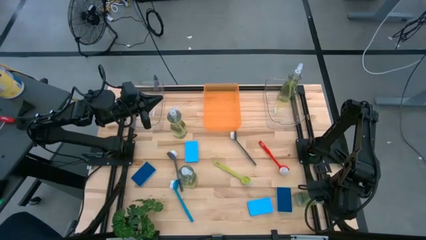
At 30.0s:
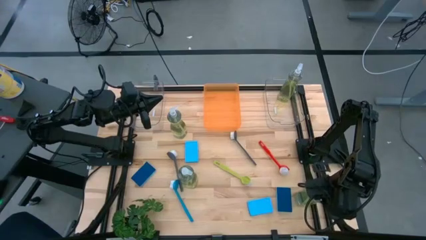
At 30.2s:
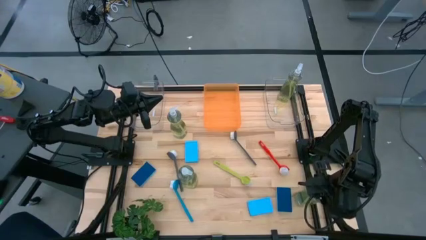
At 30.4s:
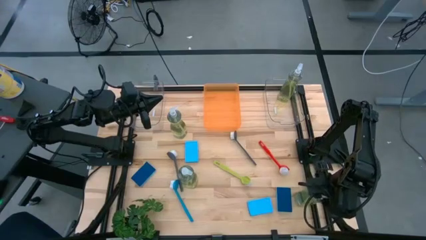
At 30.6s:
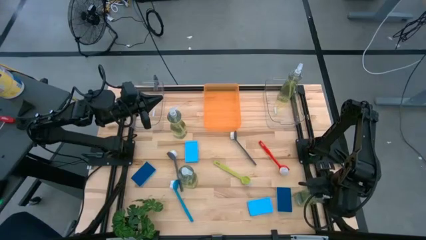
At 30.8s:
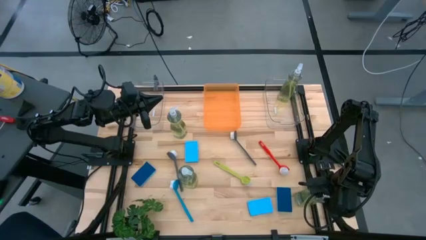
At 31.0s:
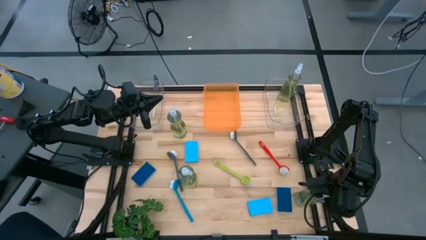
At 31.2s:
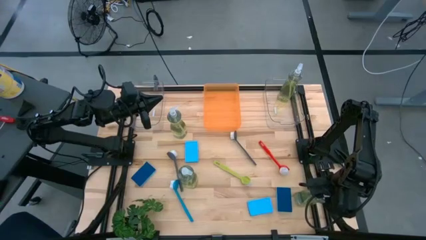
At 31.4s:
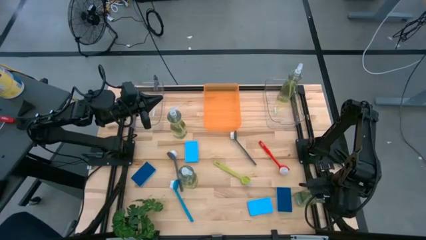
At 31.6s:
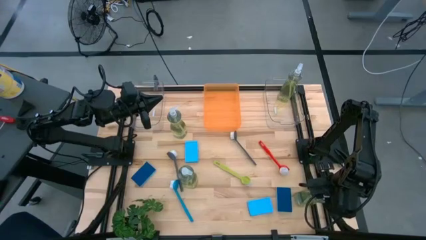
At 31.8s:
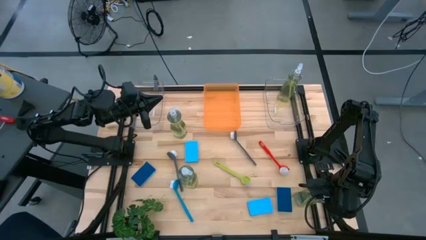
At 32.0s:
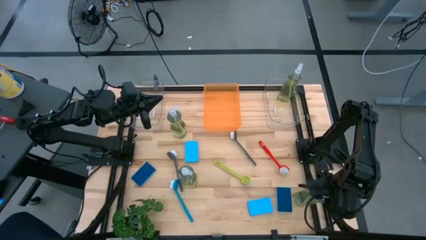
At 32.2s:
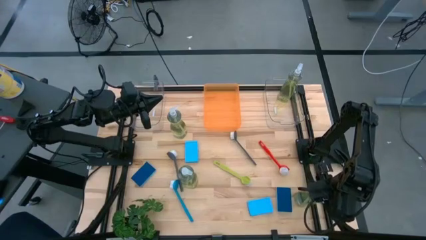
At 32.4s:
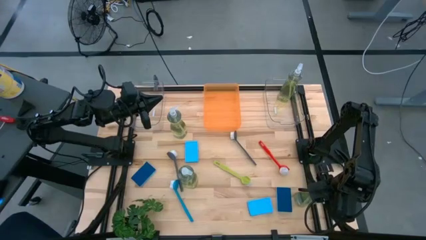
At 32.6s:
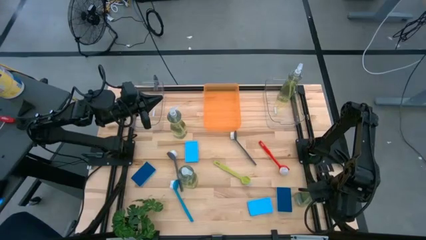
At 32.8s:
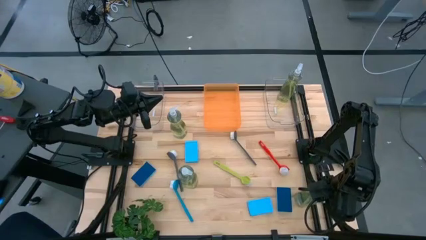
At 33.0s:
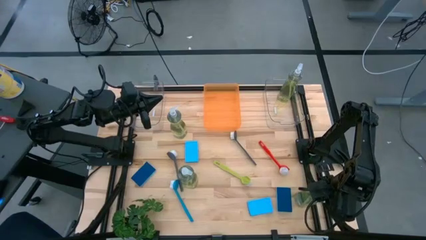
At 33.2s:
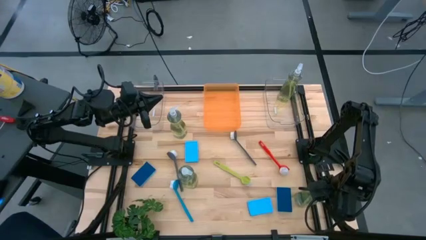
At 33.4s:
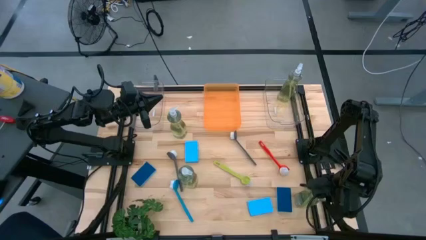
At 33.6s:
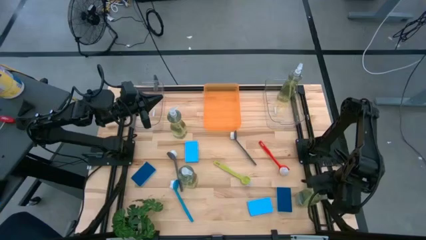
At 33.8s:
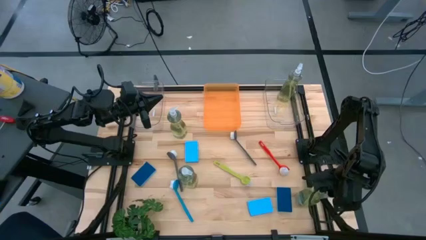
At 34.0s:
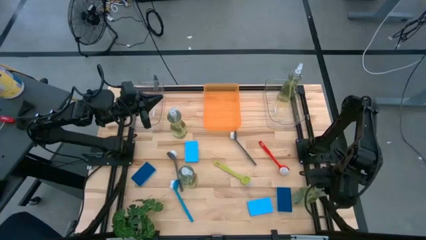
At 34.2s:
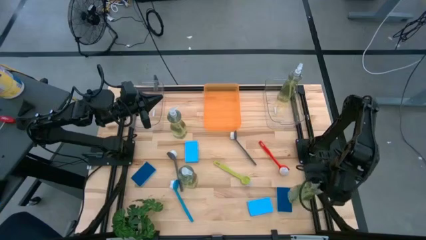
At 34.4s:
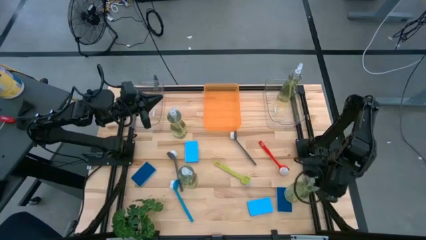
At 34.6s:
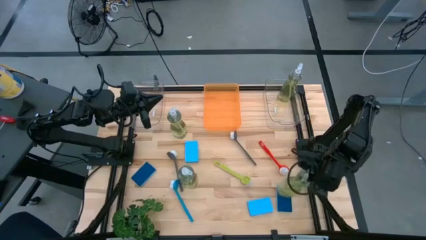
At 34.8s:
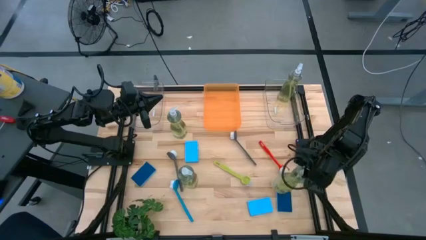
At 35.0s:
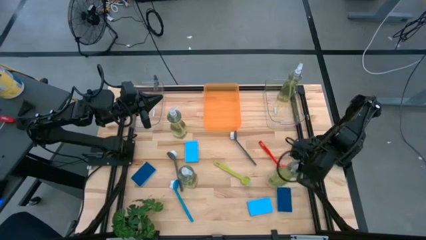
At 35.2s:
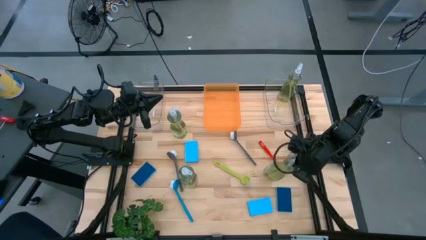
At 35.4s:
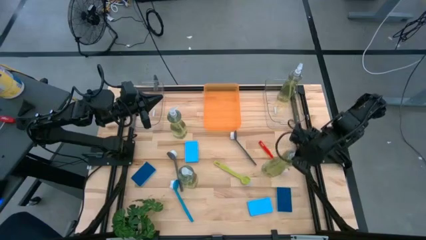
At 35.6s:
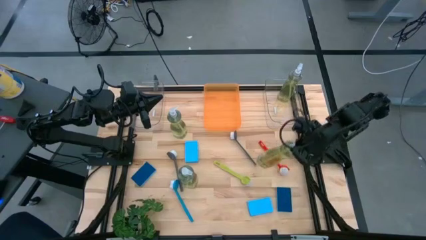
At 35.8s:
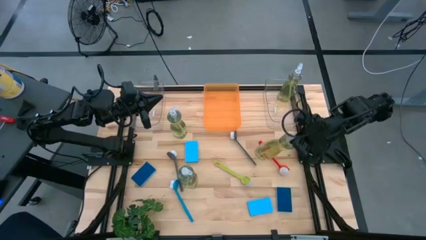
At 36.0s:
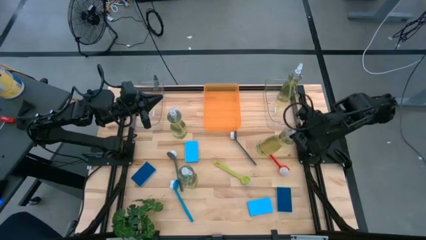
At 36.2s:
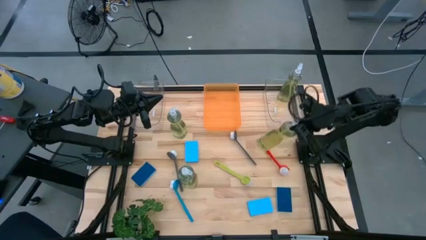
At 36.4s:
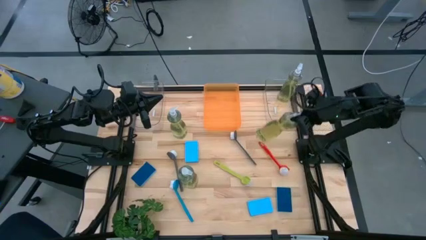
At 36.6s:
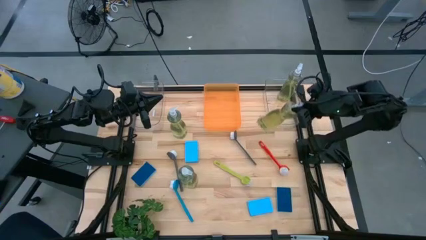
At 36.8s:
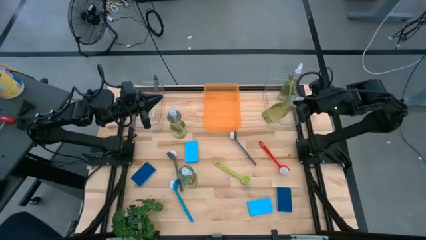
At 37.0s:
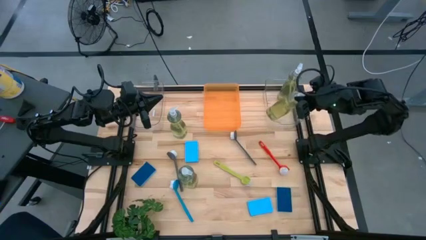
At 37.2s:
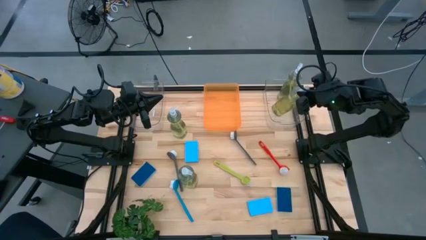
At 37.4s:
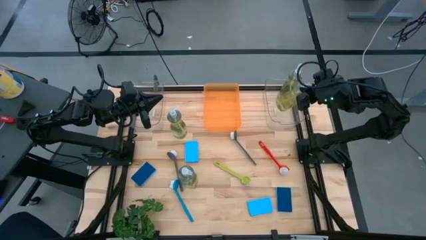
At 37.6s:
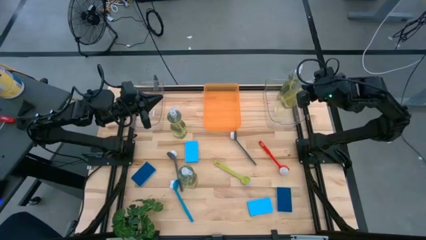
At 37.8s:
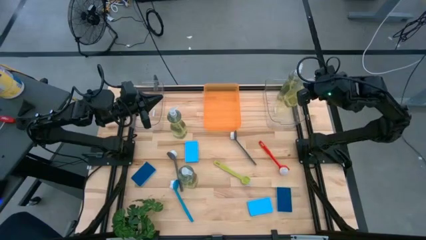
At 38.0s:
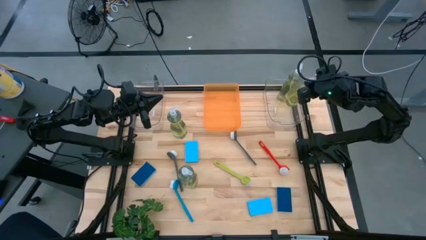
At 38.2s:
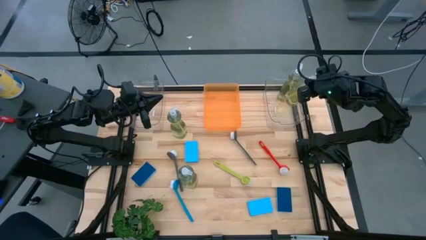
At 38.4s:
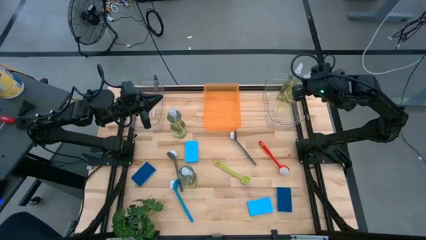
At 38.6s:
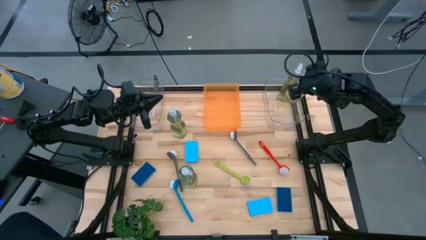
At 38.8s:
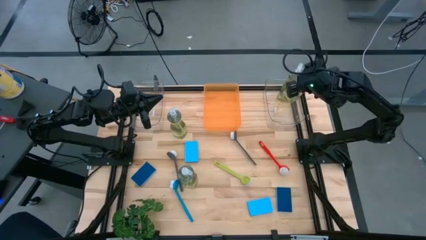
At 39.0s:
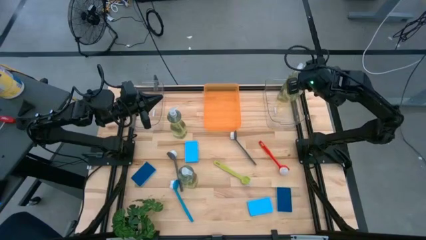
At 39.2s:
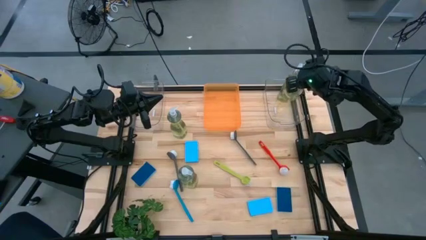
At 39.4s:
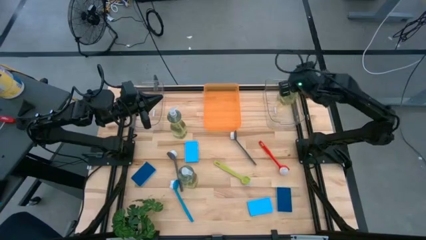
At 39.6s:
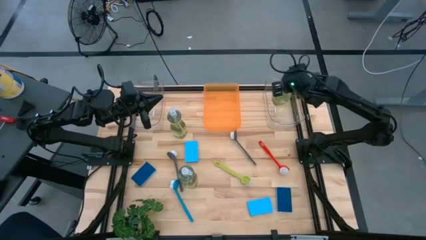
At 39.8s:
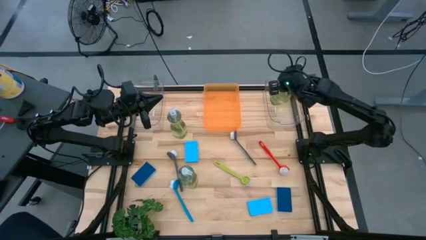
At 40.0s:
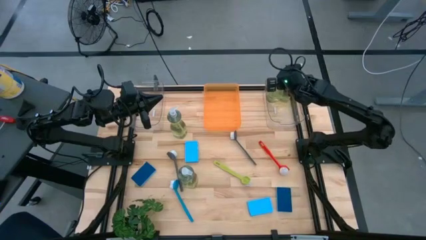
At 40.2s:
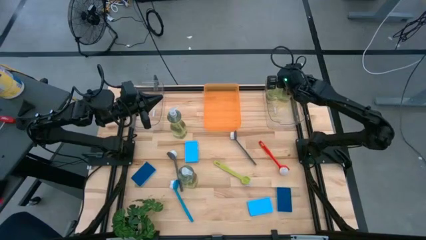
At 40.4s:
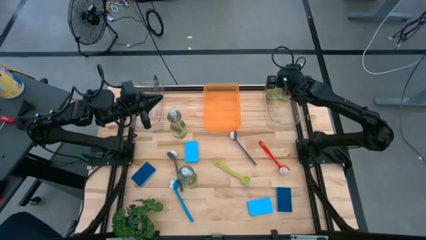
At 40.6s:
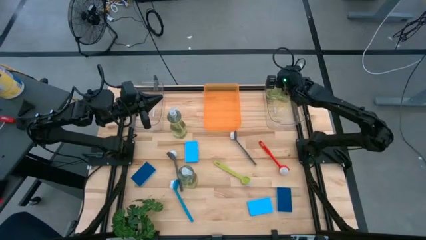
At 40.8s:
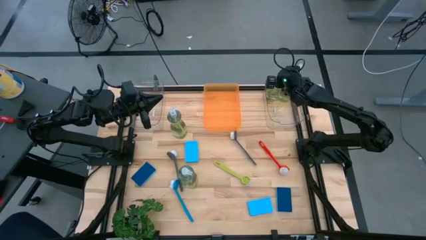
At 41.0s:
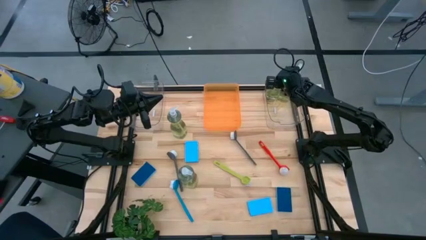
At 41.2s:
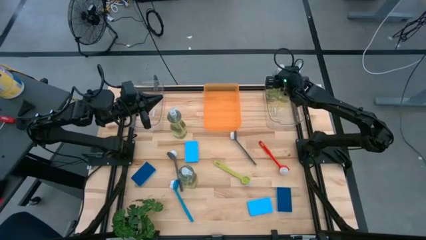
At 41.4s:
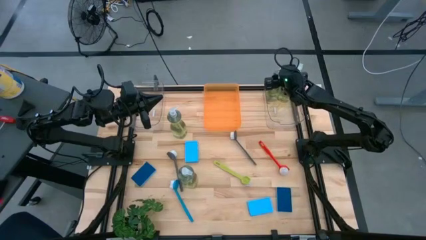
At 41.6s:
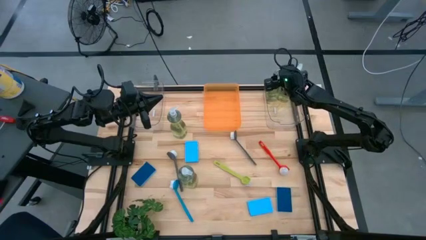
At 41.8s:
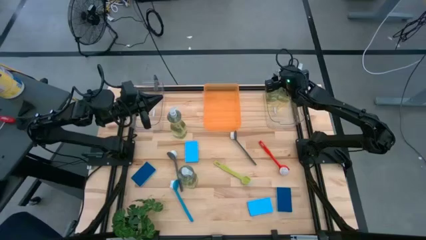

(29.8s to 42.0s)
Task: Pick & Place Kitchen Sink Supplies
Put the yellow dish soap into the right transparent bin

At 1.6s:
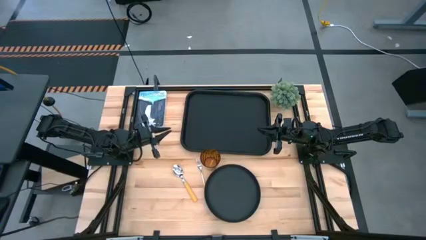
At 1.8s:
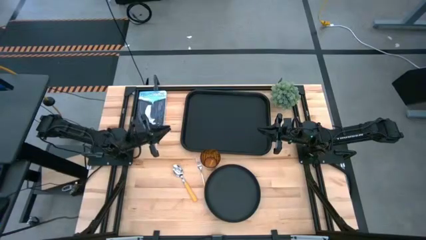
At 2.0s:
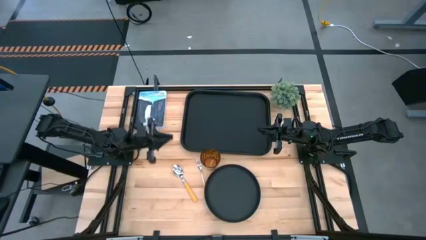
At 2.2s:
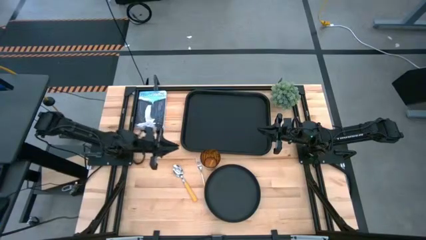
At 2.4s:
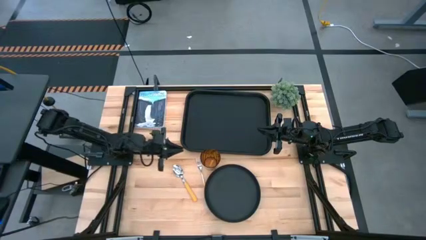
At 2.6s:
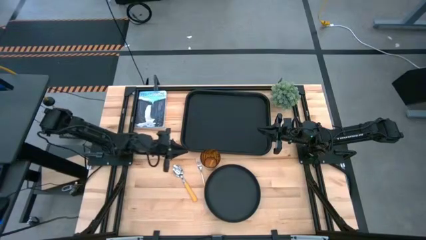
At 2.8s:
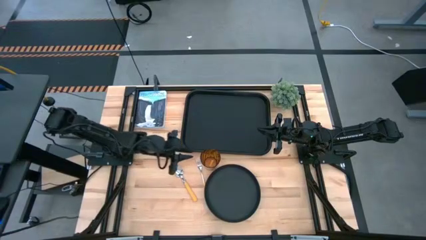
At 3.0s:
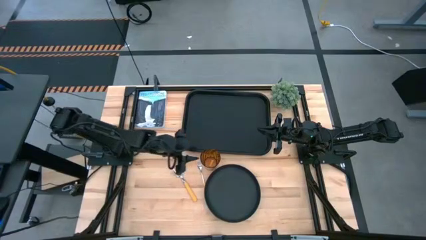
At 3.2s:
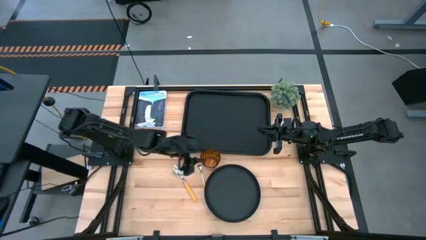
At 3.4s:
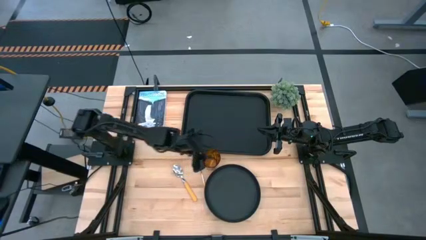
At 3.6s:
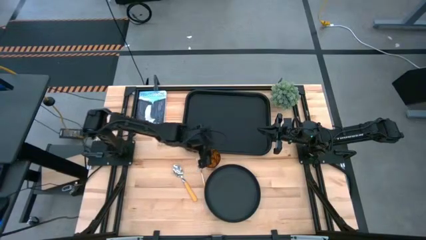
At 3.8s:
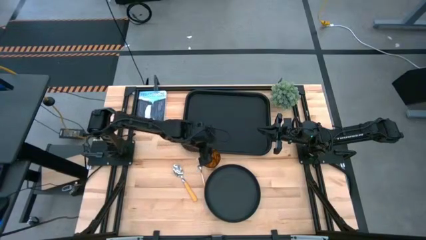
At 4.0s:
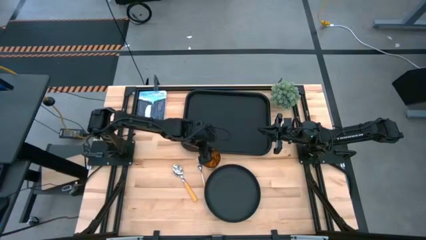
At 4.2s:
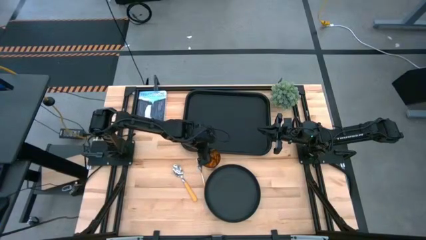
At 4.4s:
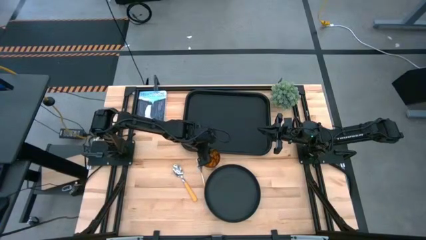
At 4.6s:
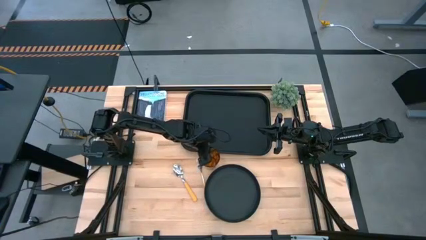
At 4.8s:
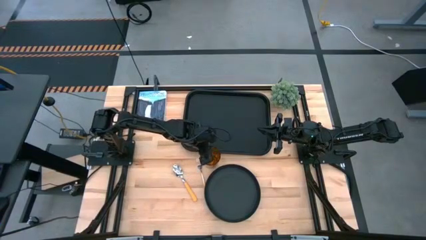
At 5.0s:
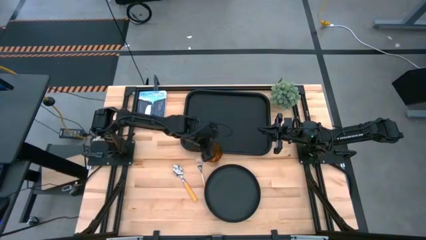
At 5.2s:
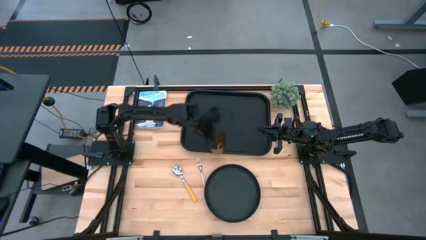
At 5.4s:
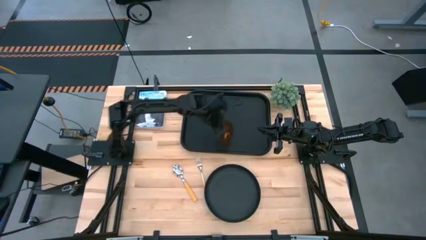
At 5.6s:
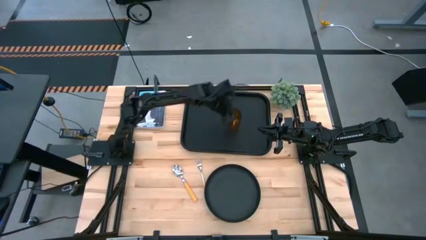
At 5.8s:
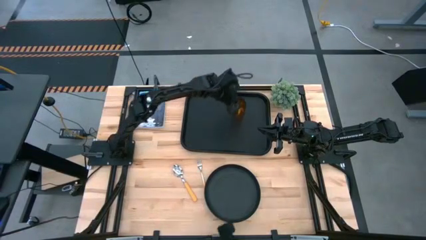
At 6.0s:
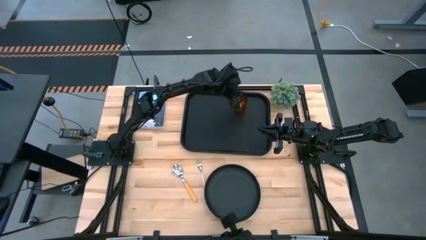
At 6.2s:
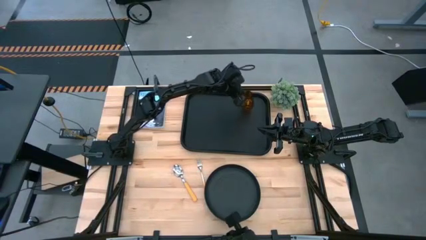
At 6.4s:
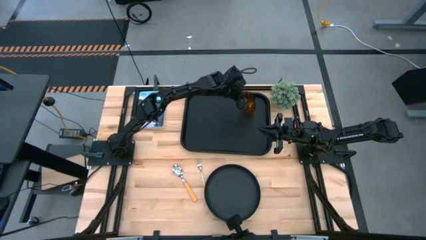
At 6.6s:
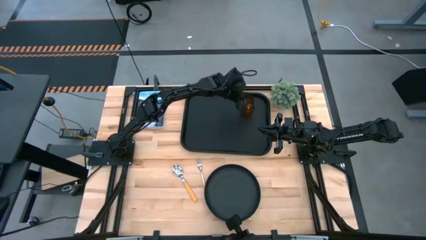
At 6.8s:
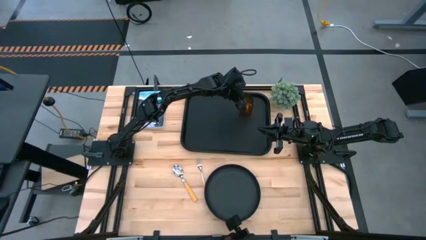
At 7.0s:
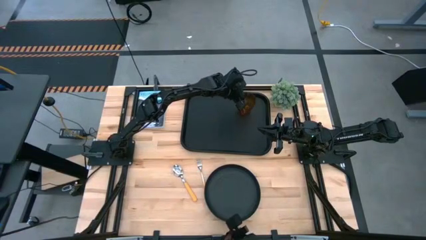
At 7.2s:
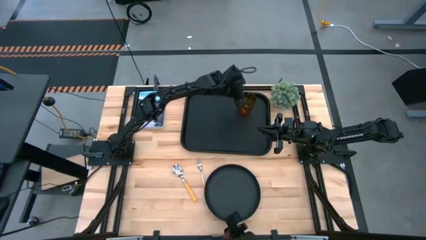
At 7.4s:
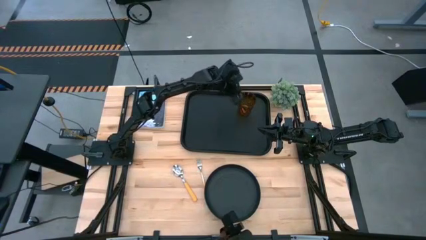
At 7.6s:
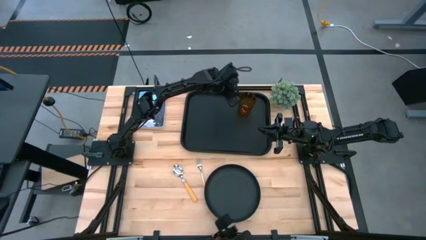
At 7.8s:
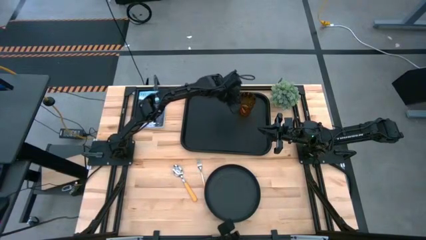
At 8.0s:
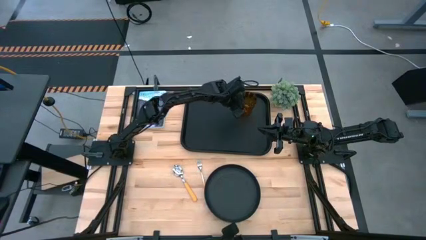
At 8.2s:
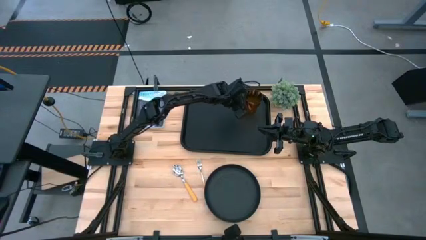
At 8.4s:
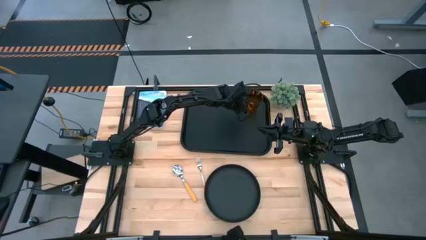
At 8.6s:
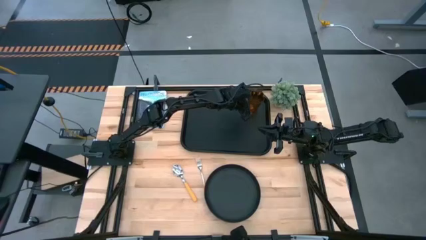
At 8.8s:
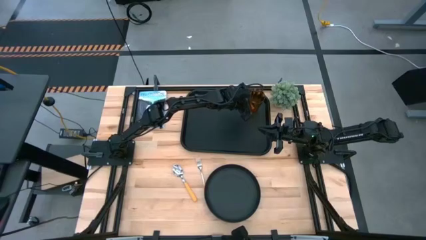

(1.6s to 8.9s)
Task: Pick and place plate/cup/fork/spoon on tray
Put the brown cup on the top right of the black tray
